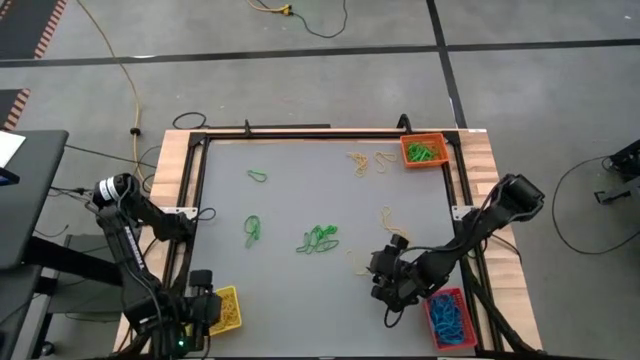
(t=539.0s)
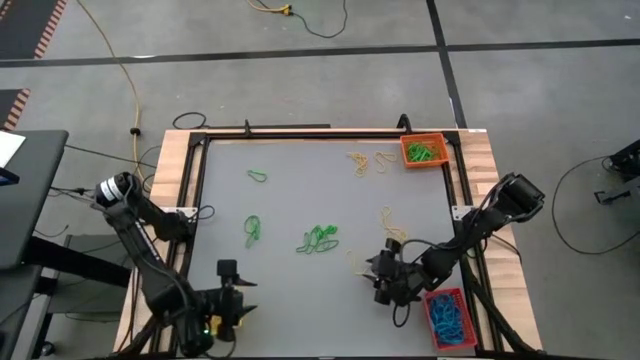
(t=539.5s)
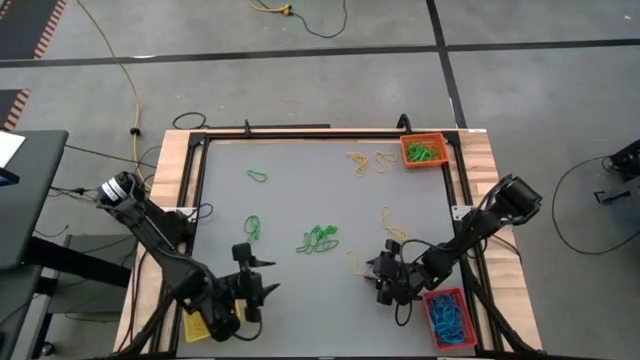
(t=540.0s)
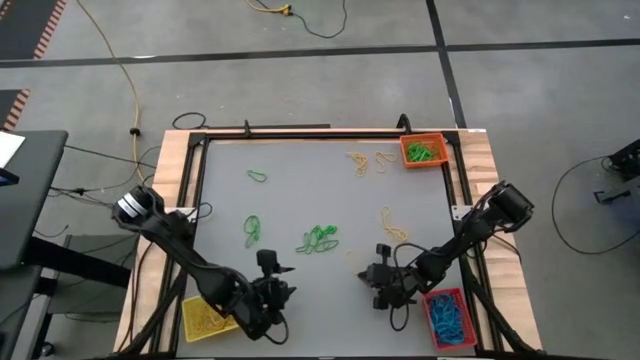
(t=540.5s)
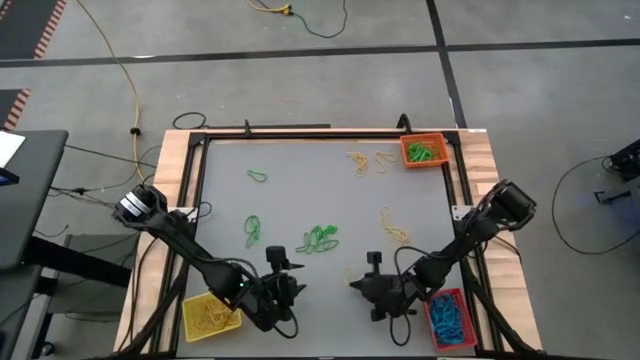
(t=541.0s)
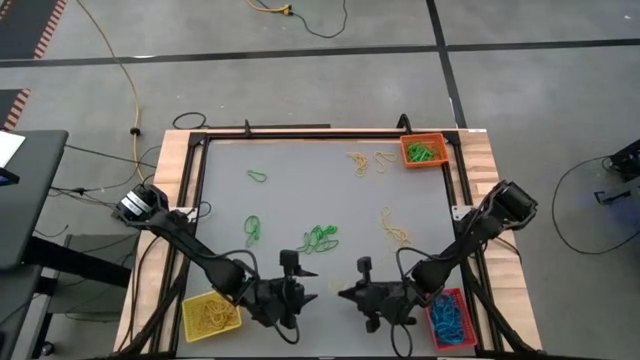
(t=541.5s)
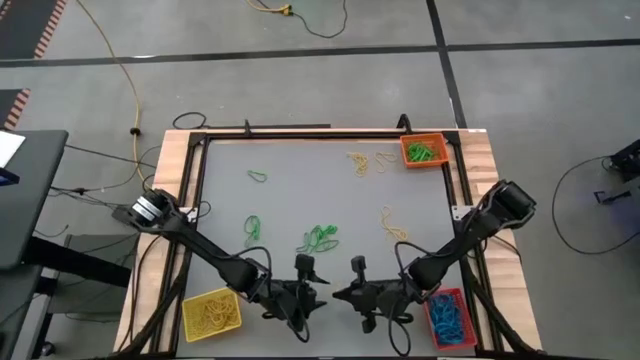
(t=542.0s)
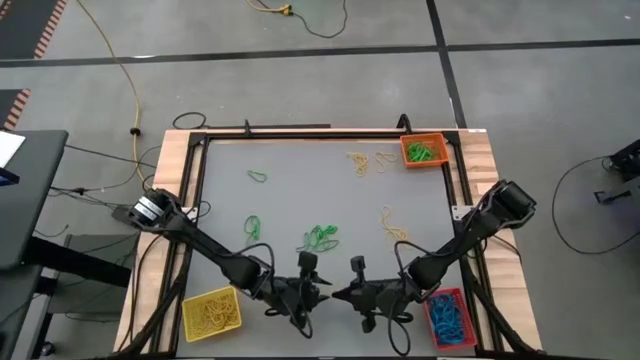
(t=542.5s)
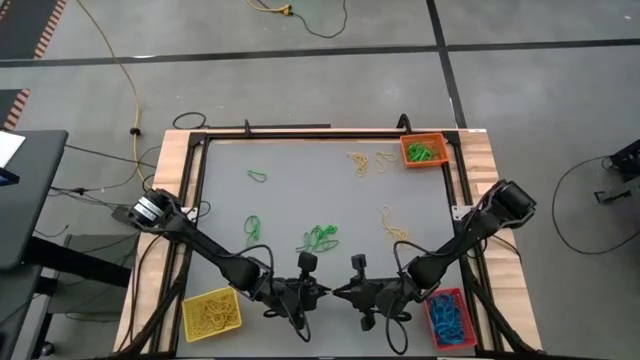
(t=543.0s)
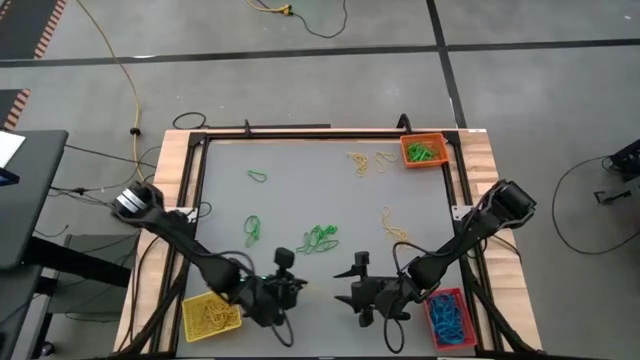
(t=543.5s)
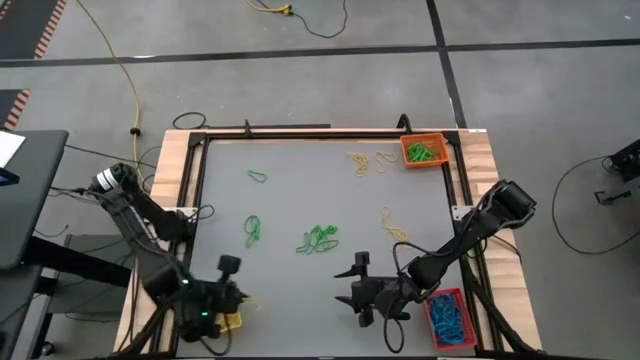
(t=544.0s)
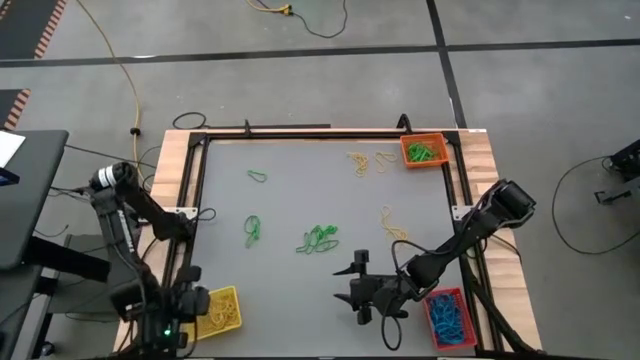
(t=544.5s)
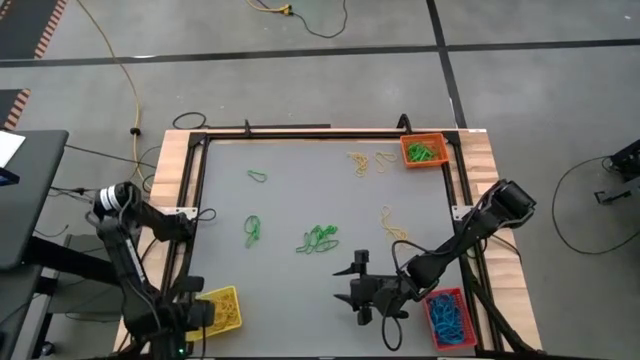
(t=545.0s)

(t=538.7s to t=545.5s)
Task: Sort rubber bands into baskets
Put the yellow rubber band into the yellow bin

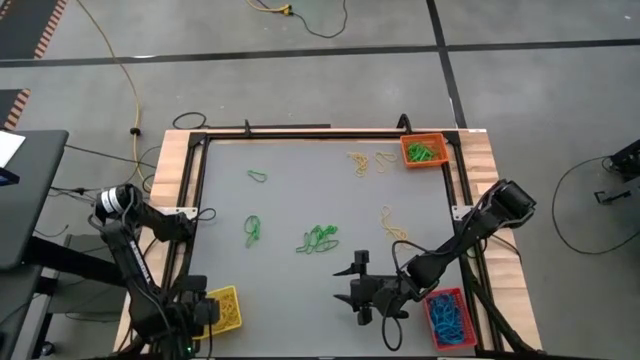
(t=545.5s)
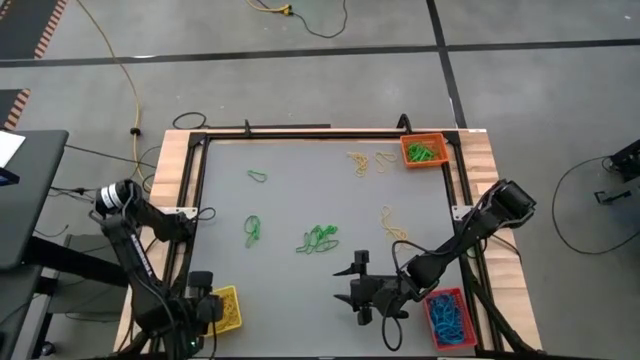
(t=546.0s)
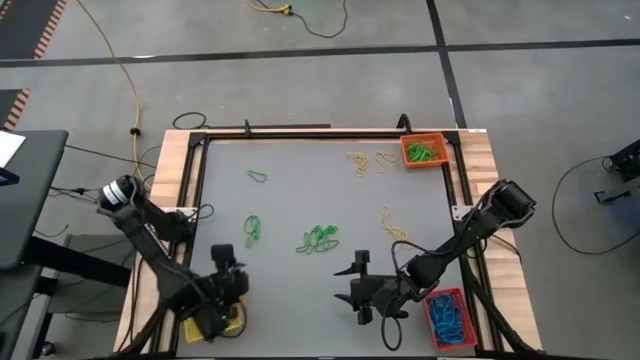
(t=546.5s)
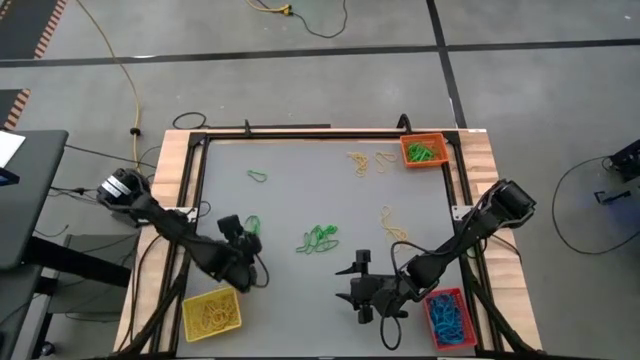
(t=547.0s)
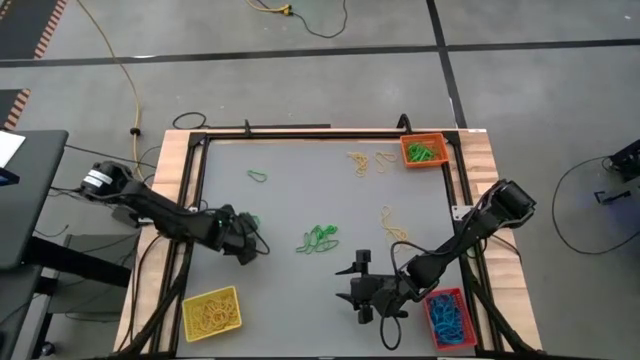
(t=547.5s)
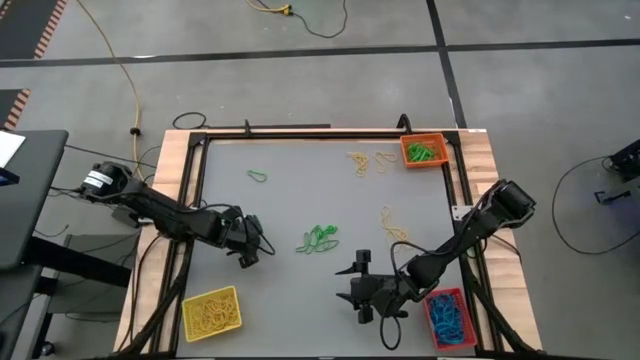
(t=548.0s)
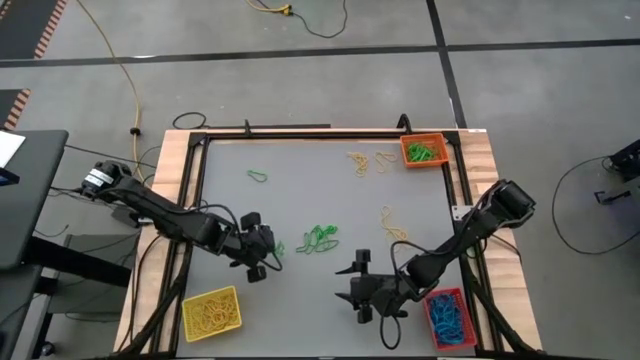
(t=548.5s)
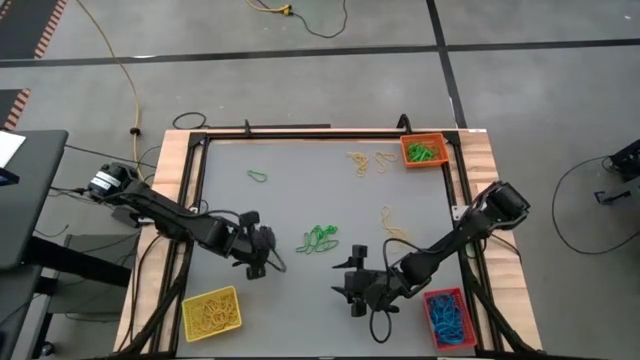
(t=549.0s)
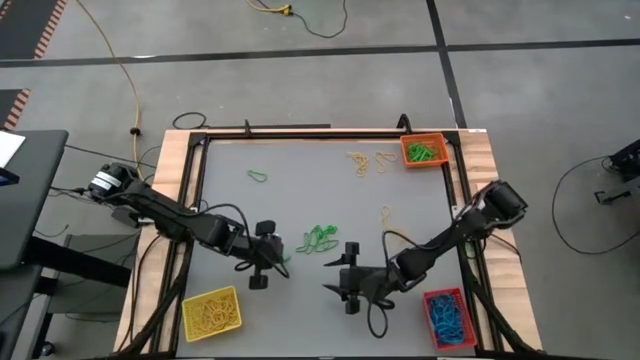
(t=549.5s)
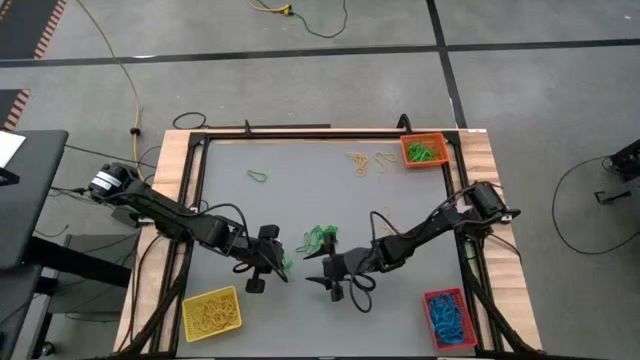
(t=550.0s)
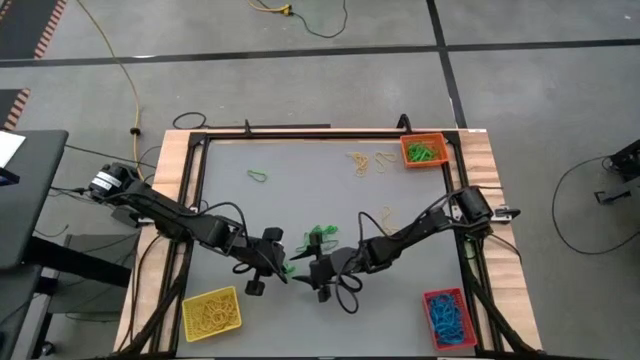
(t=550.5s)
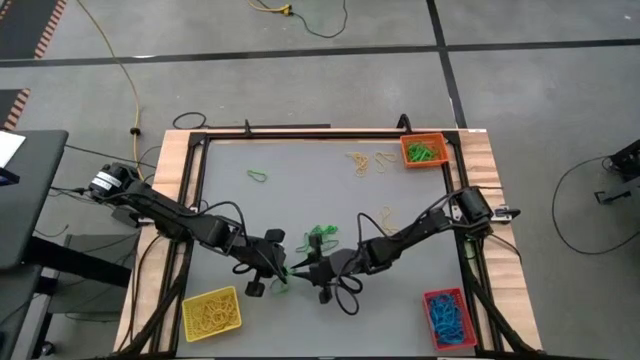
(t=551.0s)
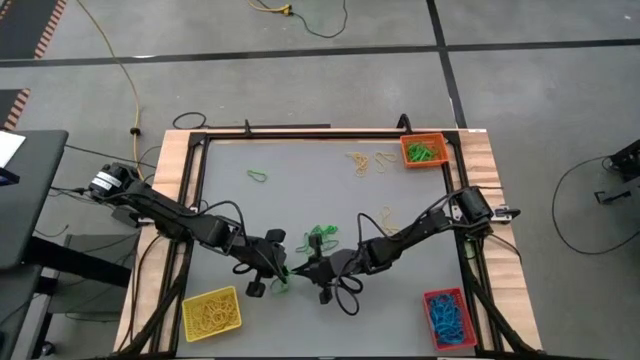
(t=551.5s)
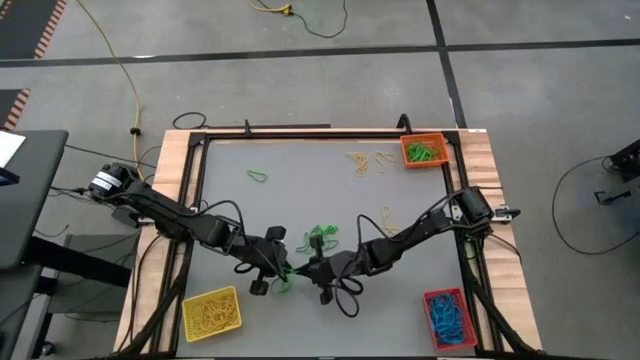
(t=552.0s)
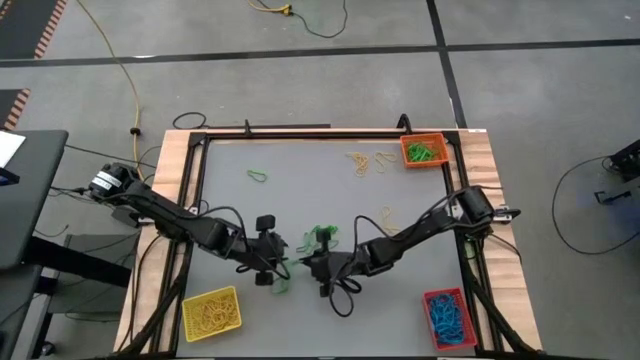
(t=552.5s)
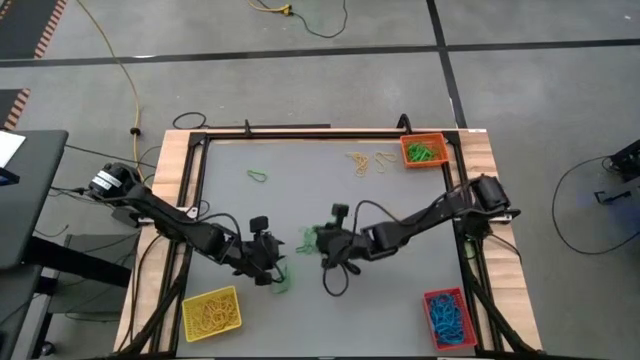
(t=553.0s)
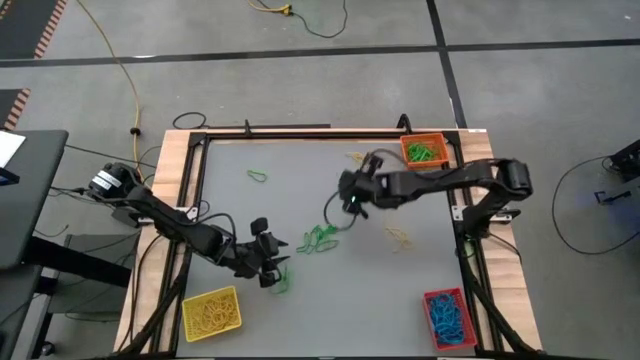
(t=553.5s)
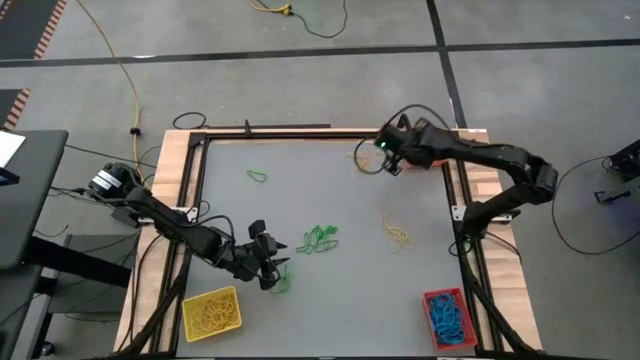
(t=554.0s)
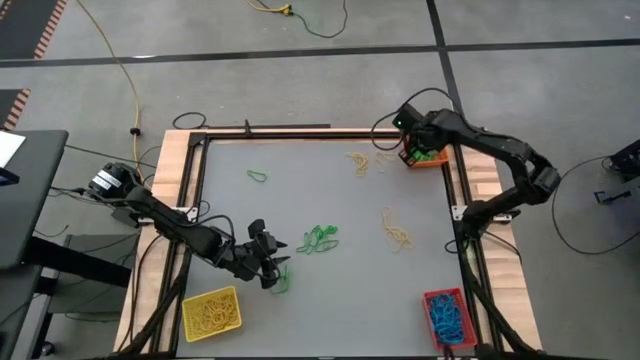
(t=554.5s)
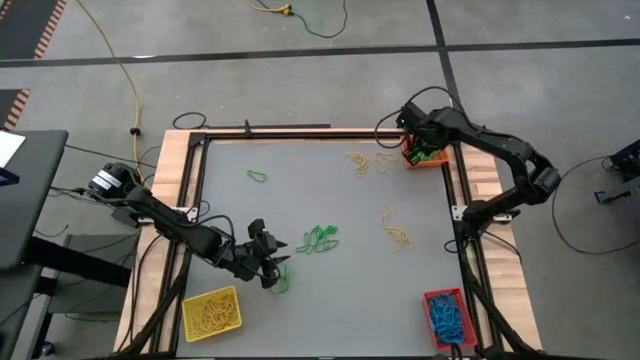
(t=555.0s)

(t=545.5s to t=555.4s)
Put the green rubber band into the orange bin

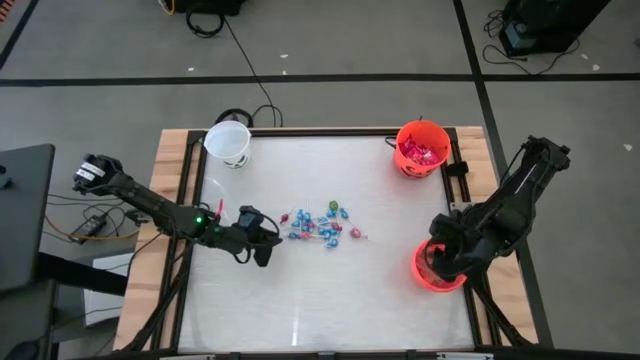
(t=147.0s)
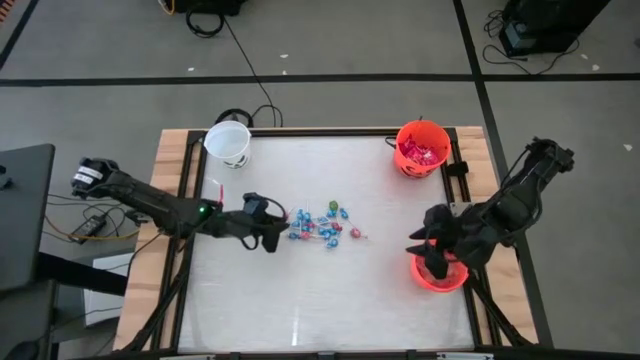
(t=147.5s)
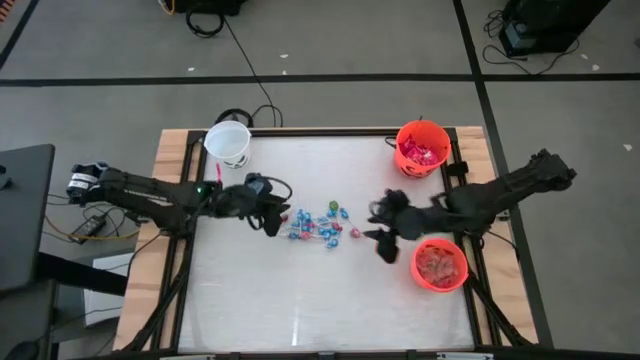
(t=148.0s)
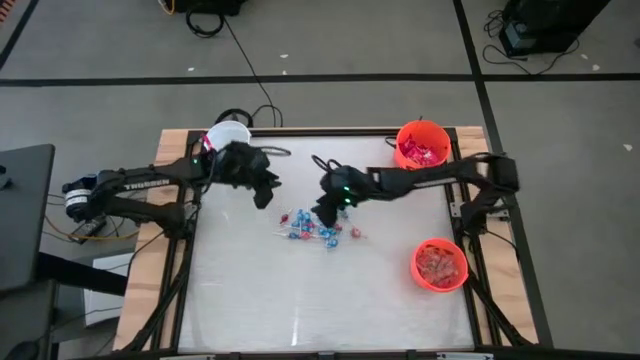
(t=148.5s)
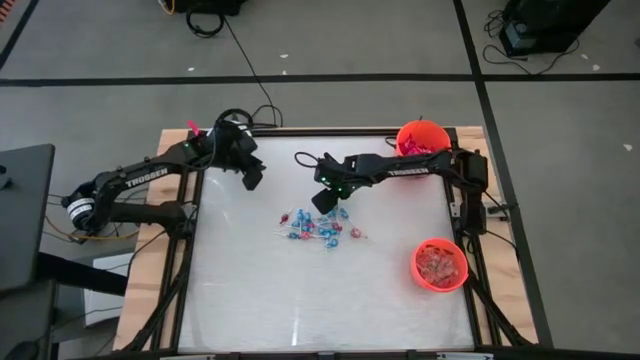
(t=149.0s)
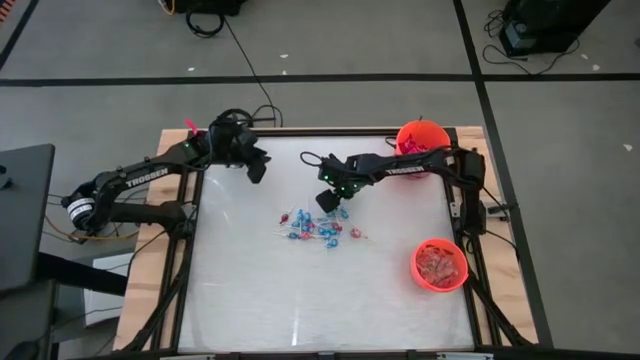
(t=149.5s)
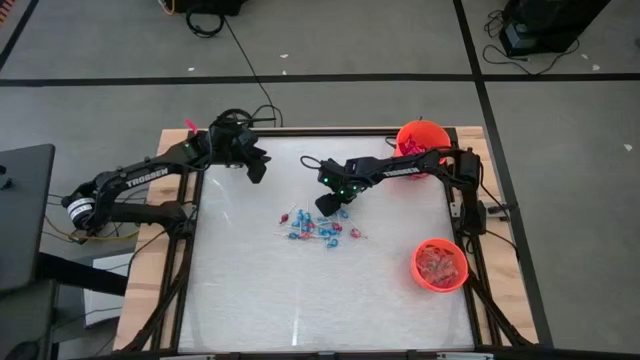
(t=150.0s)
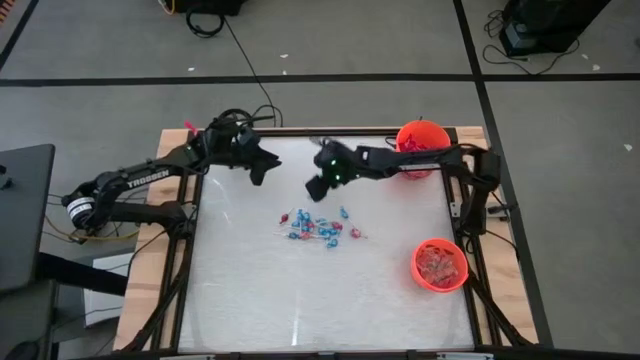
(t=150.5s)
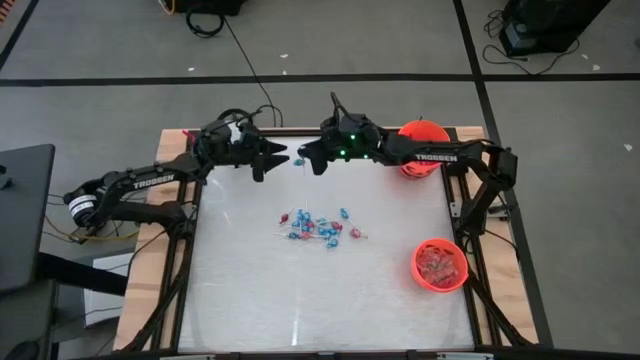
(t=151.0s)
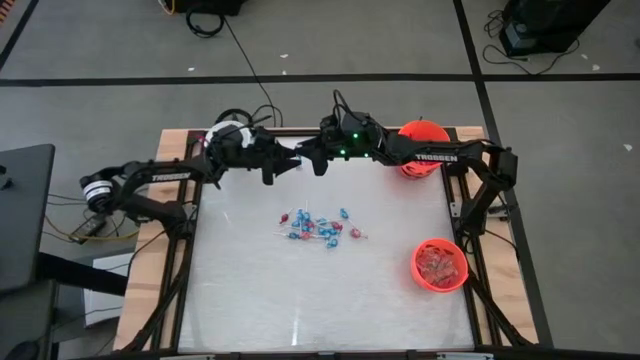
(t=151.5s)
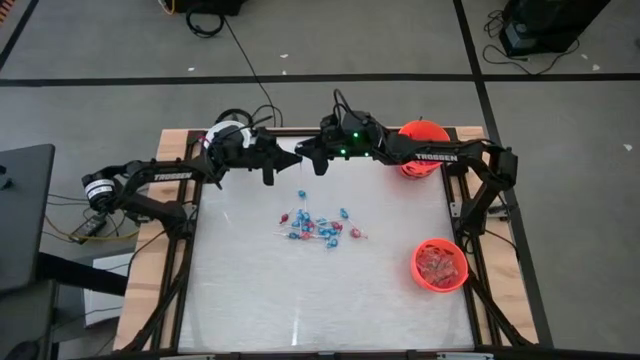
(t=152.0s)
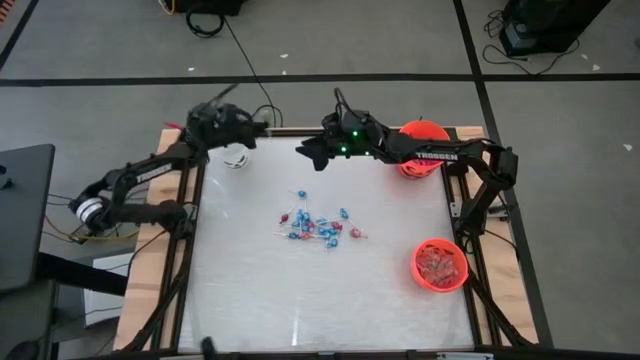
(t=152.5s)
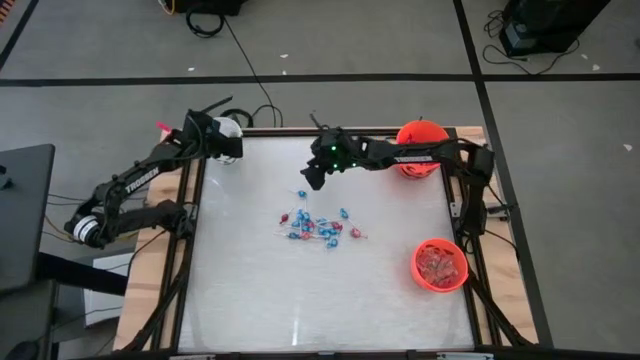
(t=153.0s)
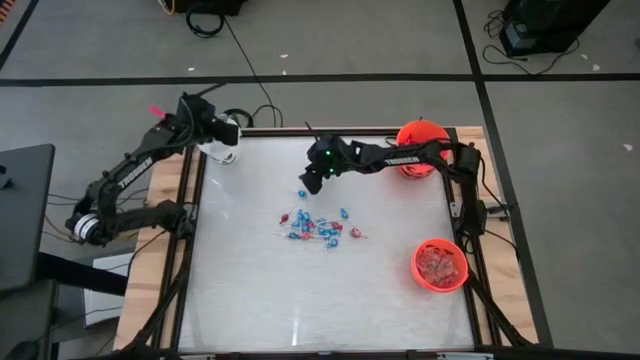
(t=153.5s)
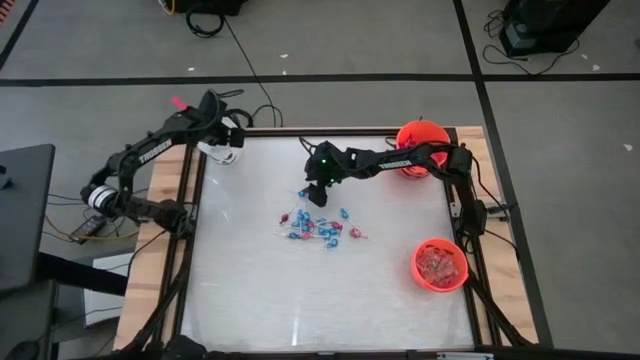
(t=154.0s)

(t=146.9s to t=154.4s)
Task: Sort candy by brand, put in halloween buckets
Put the green candy into the white bucket
